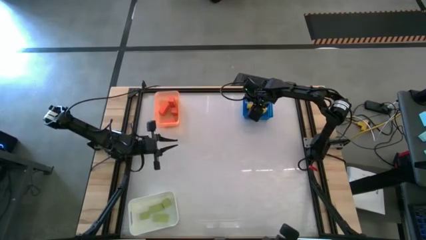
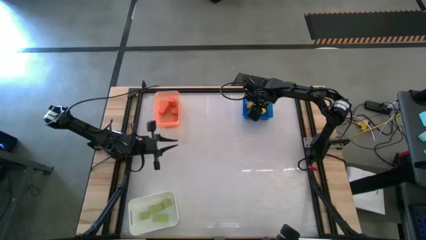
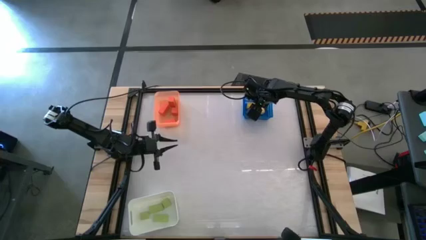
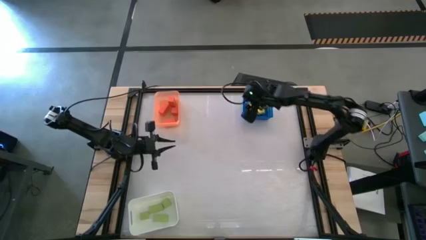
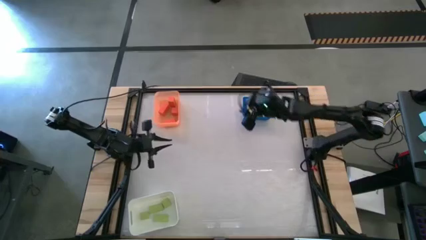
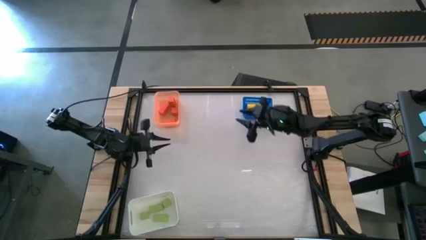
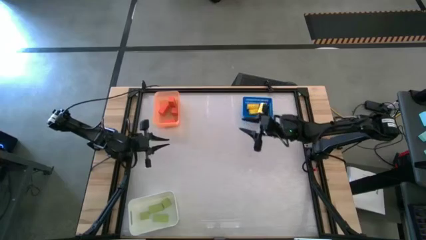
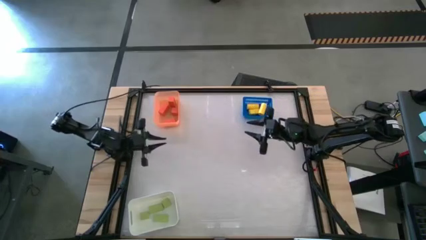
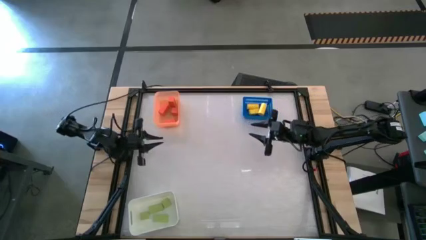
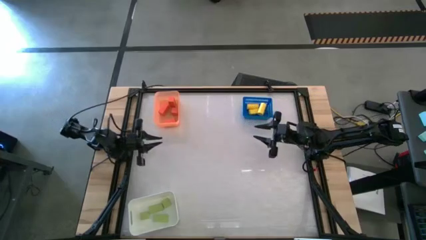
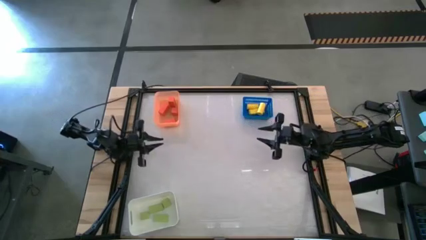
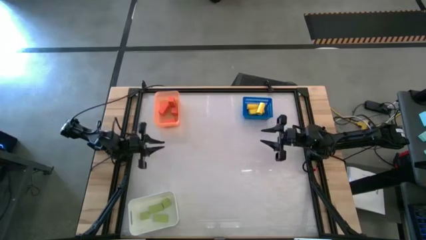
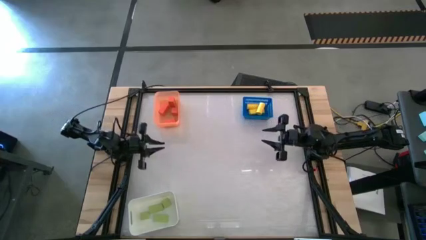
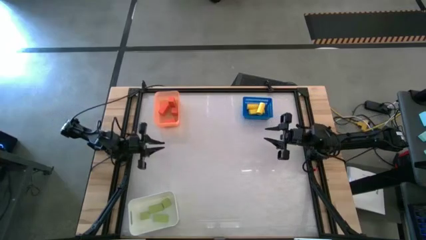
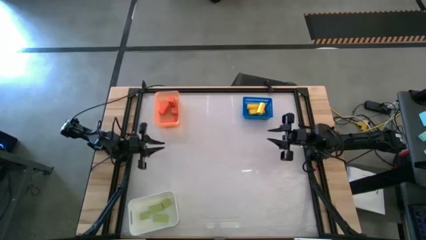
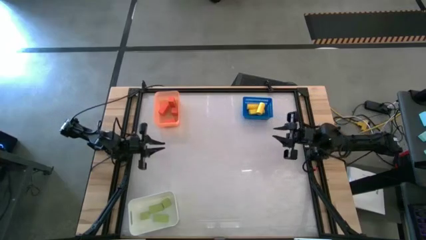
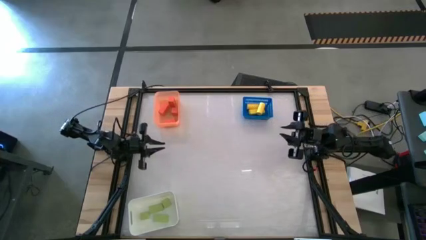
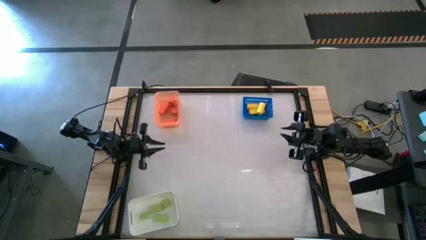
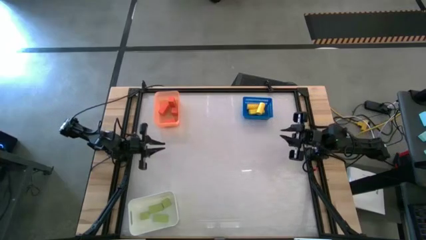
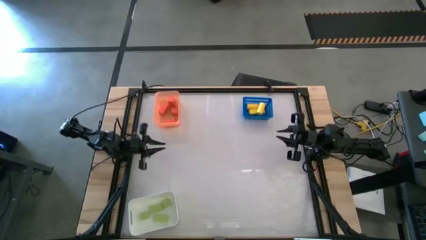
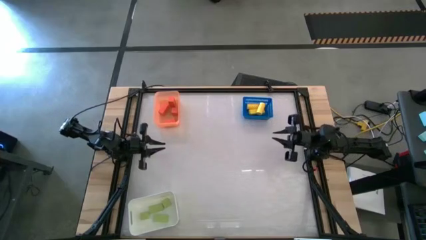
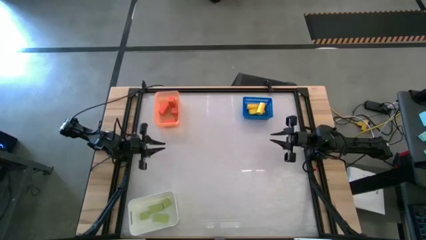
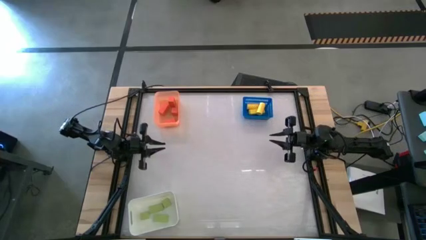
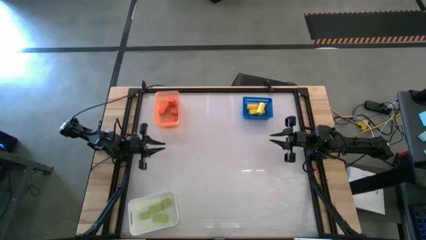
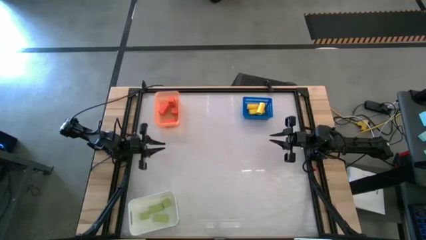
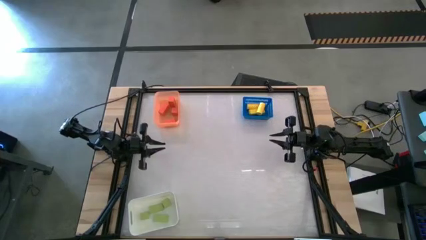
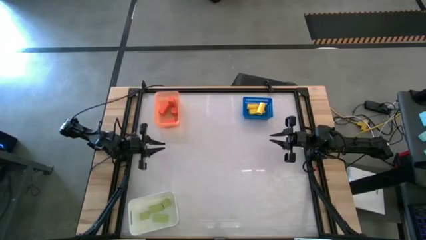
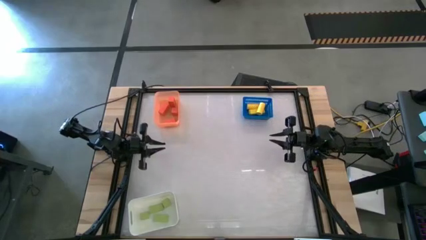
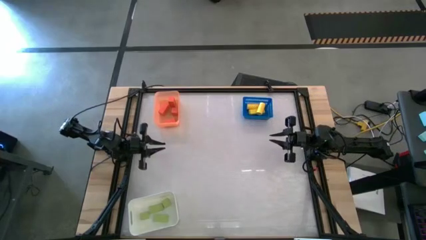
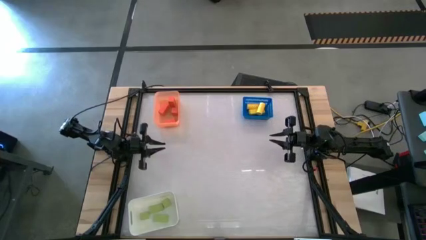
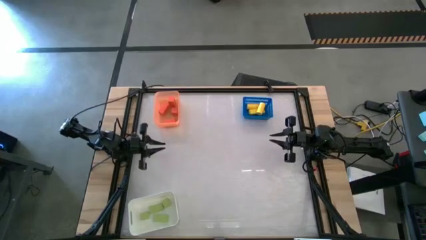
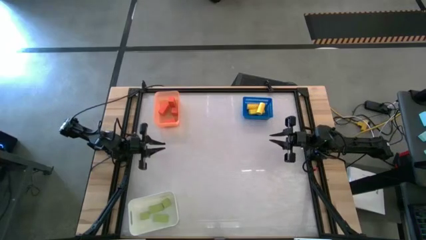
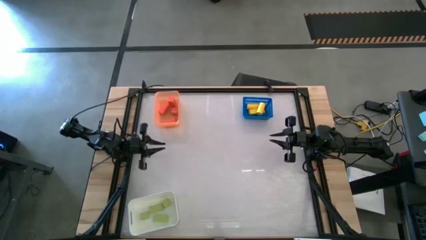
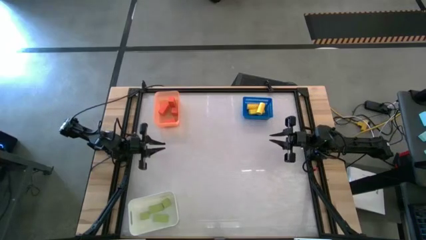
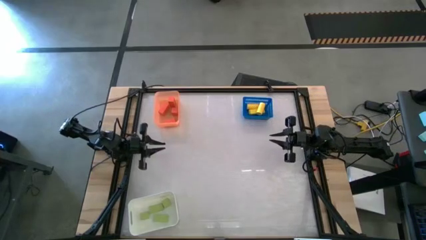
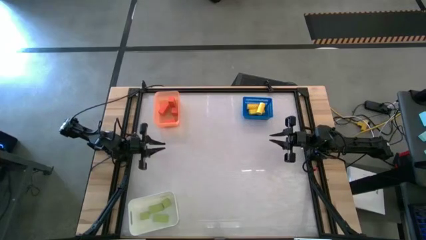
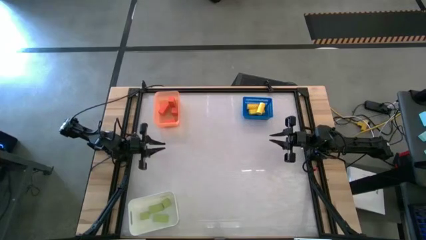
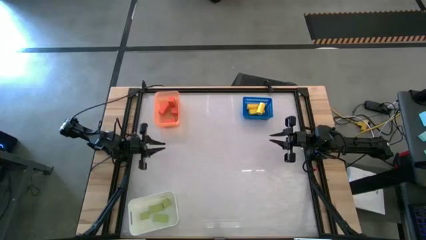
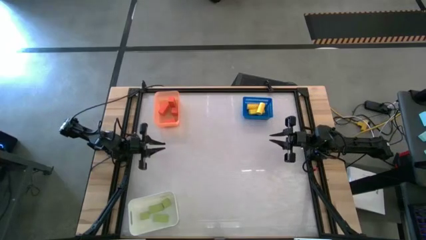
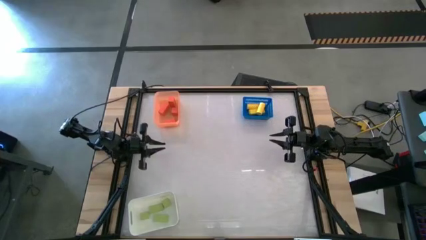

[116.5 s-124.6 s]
Task: Sort & place blocks by color
Return to Home Position
